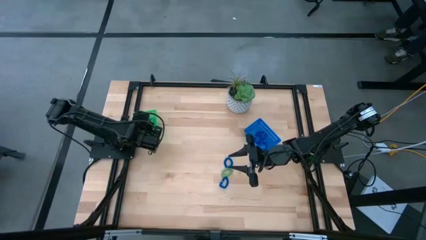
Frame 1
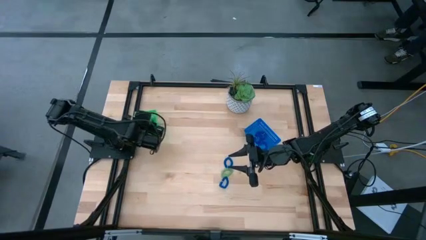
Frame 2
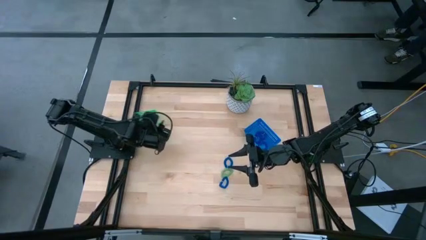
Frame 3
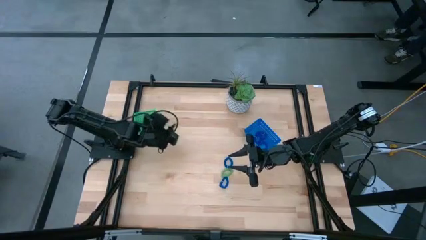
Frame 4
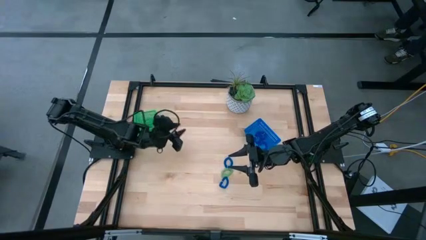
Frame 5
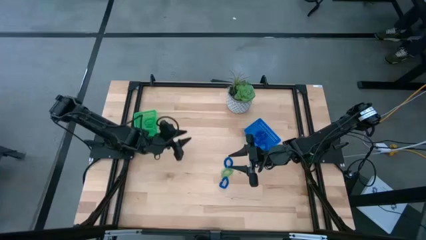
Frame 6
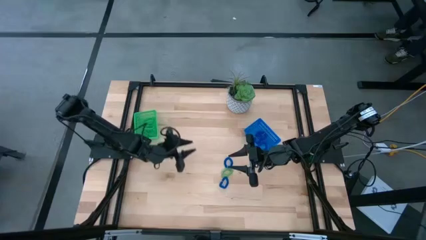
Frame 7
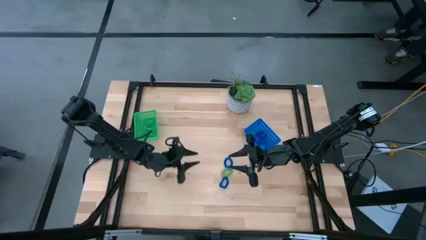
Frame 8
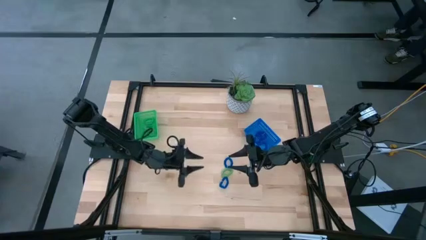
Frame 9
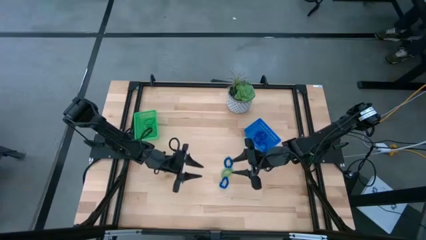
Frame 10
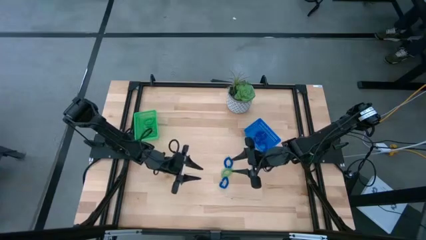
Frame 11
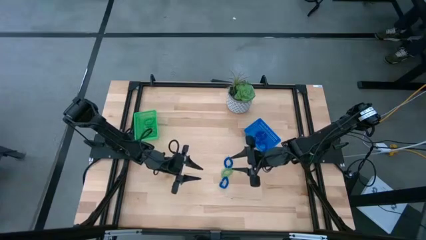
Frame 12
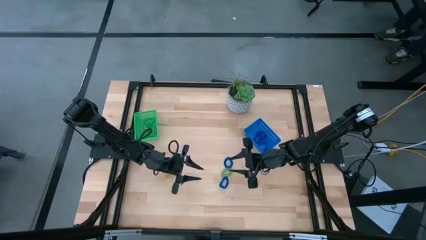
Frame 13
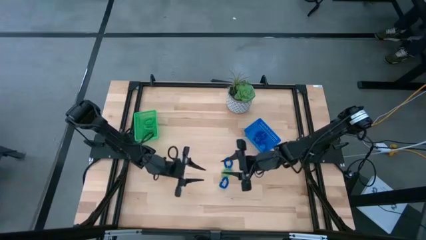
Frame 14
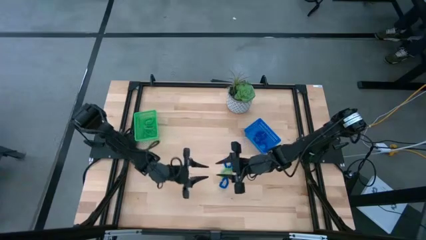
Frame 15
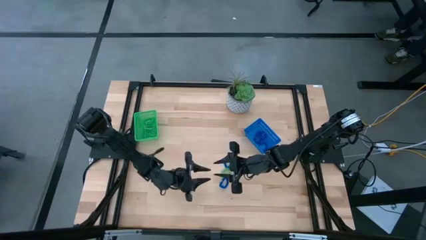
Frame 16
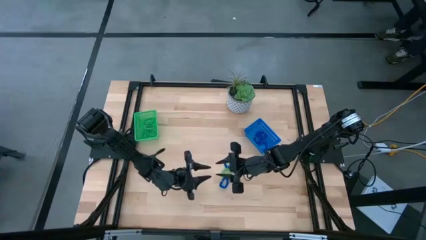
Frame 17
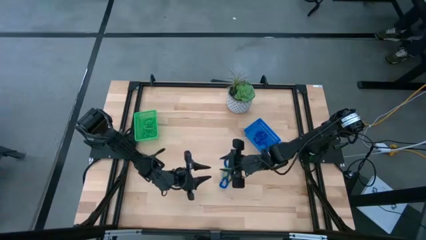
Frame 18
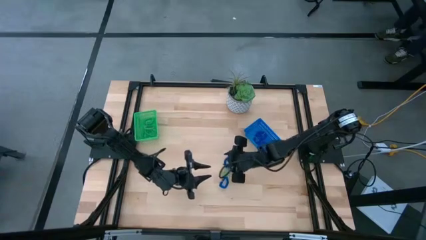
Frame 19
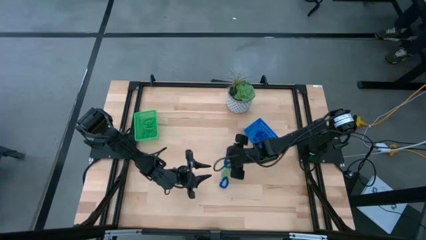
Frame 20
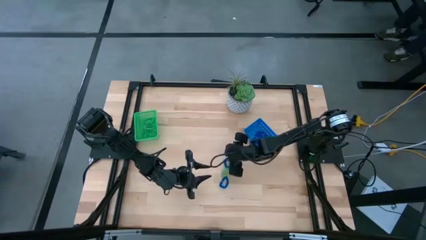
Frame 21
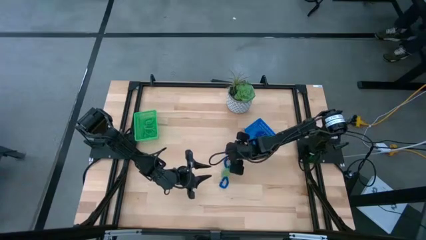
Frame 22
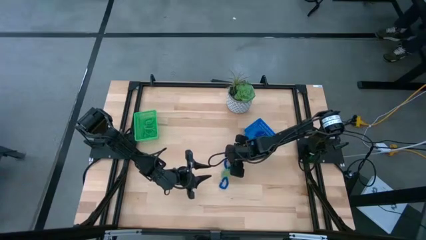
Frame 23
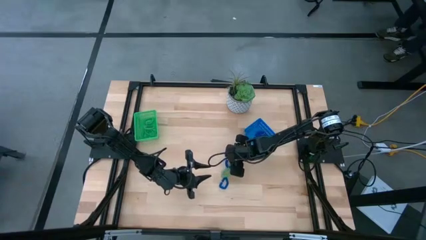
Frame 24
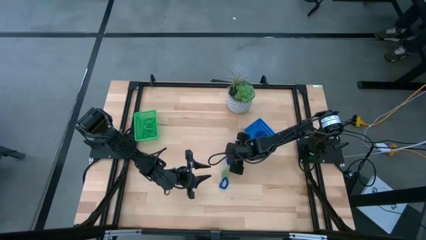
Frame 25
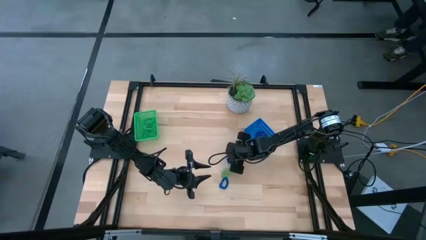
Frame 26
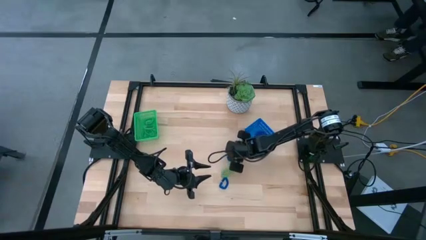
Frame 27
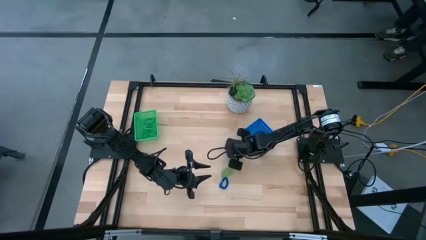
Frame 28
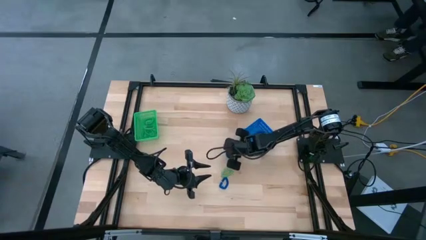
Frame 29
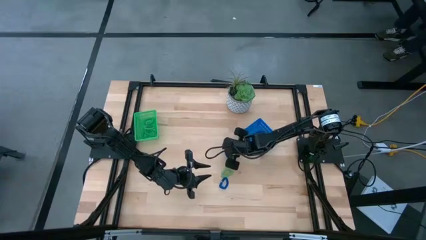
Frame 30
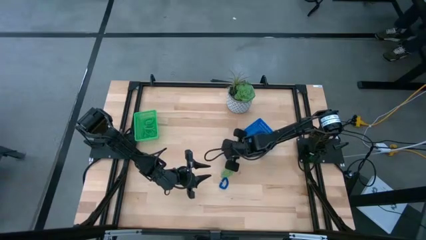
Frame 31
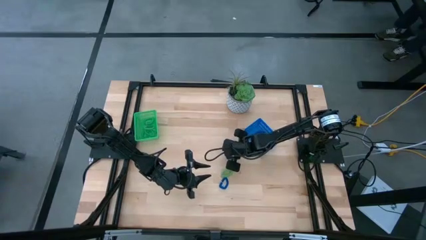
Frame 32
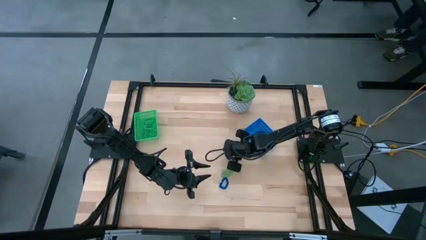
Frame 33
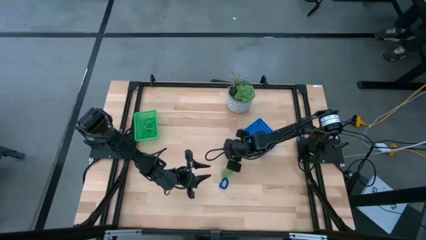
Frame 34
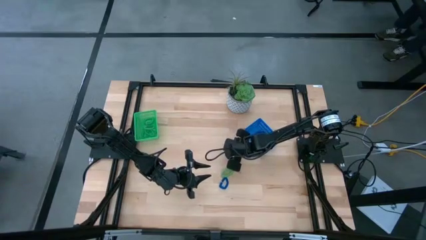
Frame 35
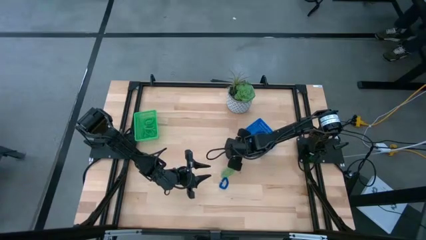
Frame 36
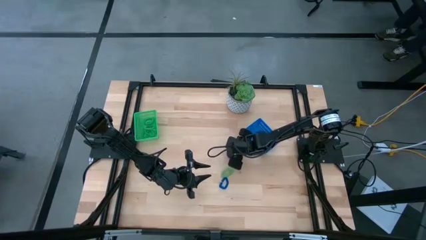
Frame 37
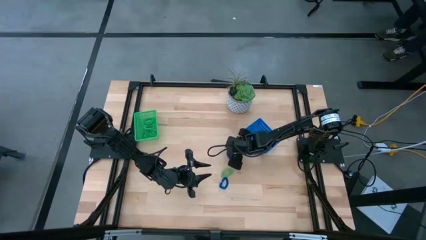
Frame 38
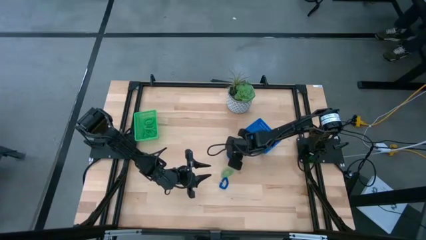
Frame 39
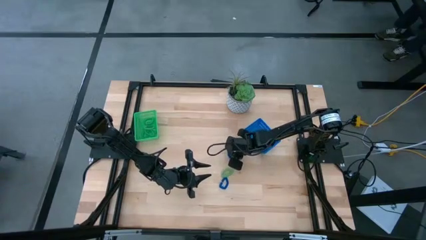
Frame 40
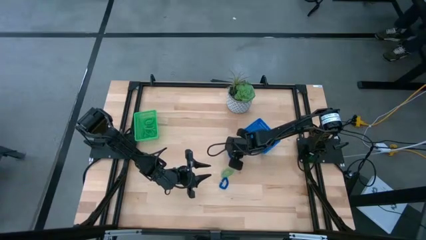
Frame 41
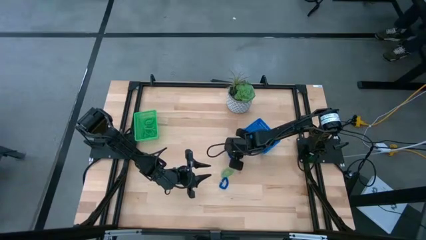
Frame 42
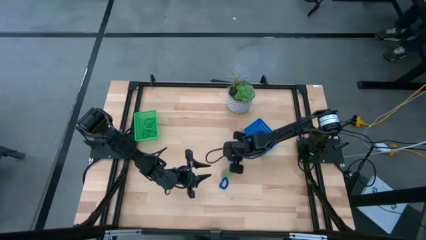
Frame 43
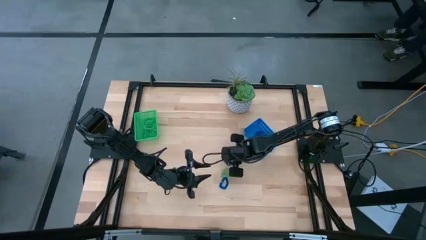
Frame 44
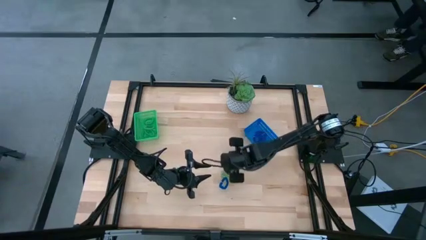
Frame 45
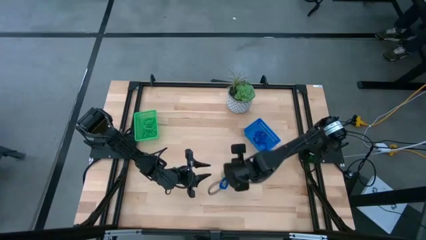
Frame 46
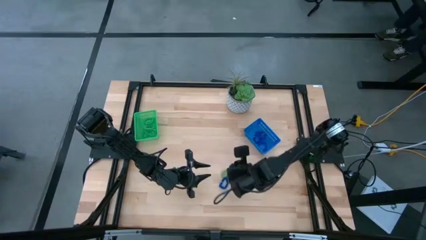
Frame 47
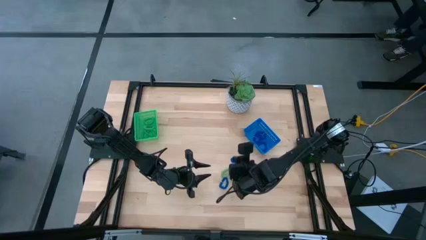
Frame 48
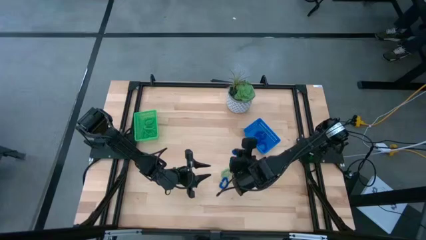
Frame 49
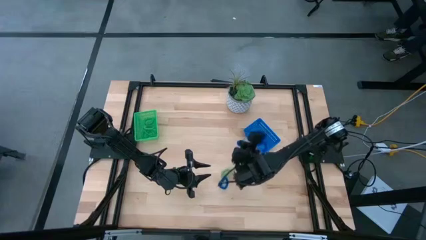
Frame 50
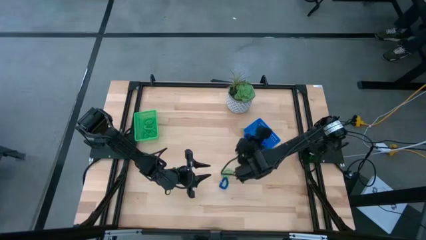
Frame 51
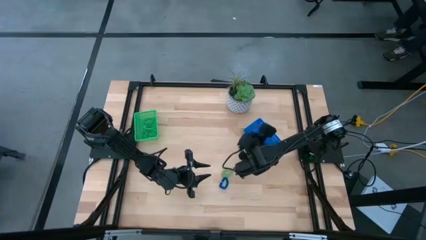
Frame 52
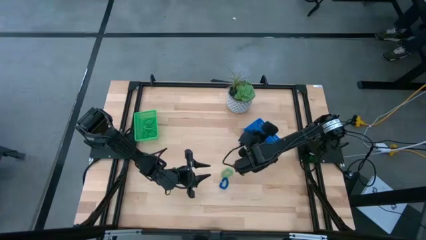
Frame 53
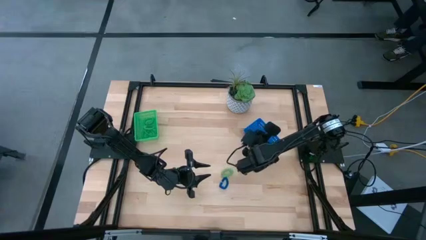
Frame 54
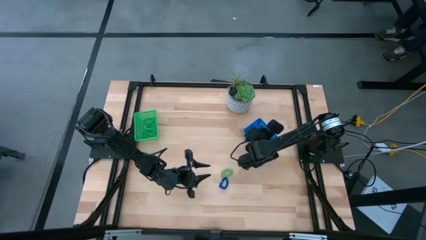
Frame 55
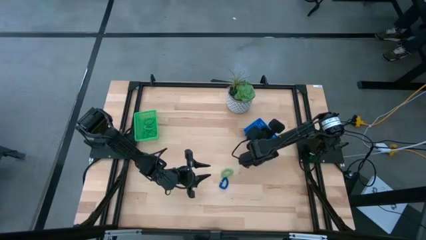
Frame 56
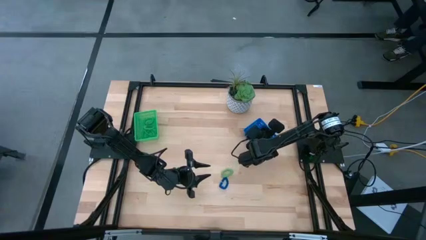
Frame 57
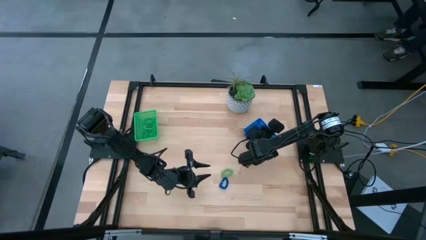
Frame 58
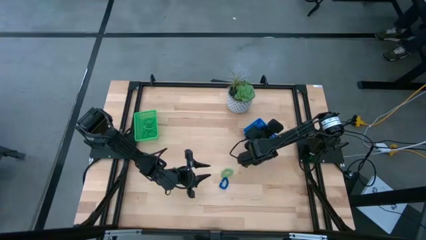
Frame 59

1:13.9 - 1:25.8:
Task: Sort spring keychains
Put the blue spring keychain in the blue bin

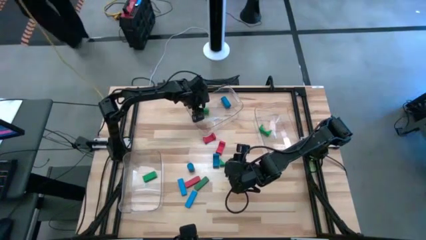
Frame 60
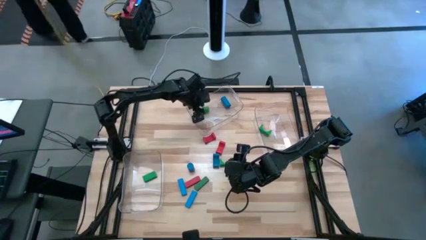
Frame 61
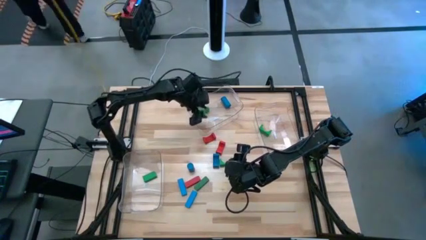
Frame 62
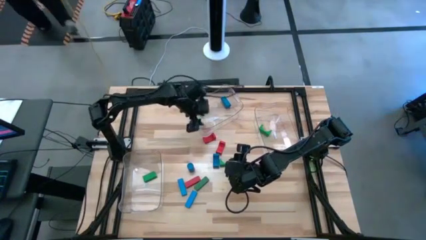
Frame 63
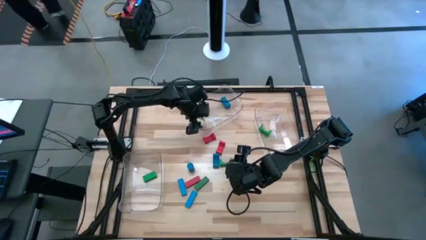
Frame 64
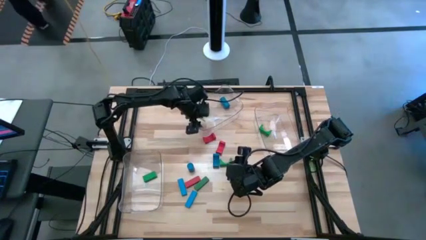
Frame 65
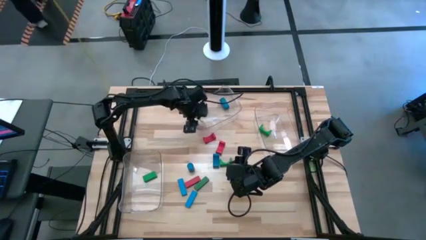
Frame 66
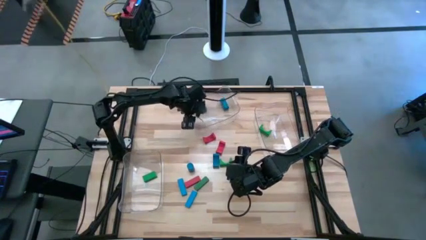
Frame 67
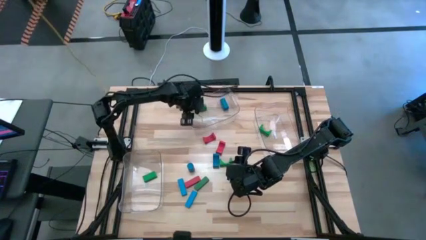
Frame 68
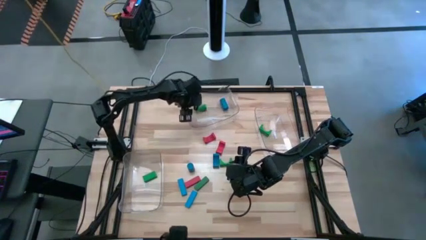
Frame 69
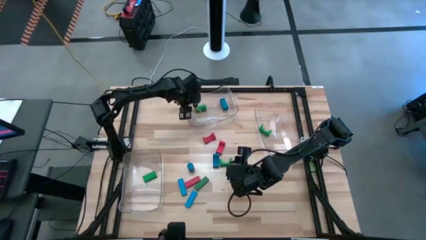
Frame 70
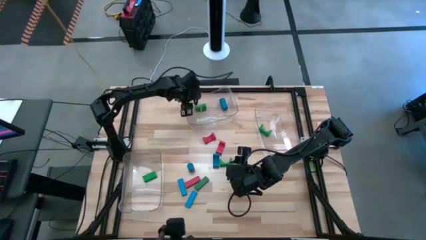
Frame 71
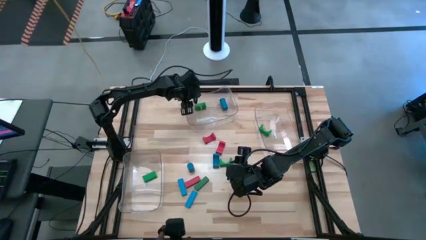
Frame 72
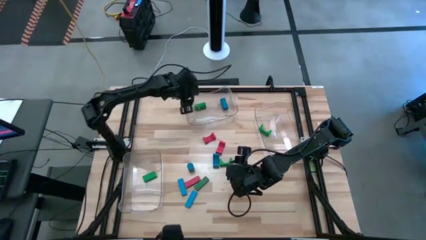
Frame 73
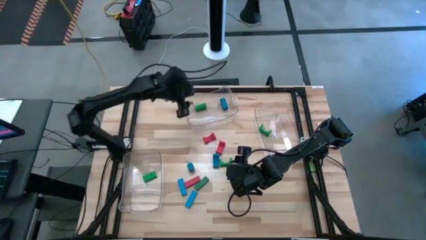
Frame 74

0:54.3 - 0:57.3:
Task: Sort blocks by size
Adjust the top transparent bin
